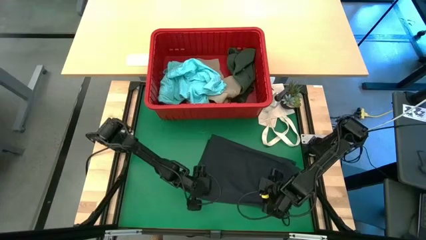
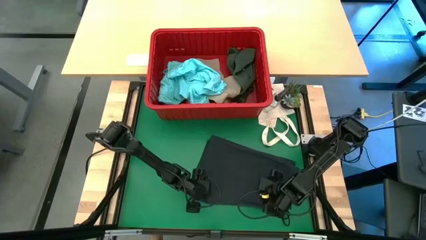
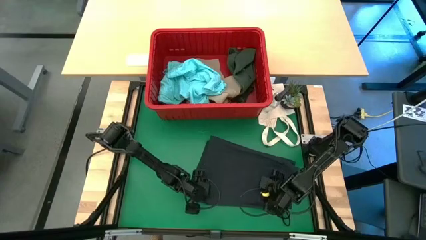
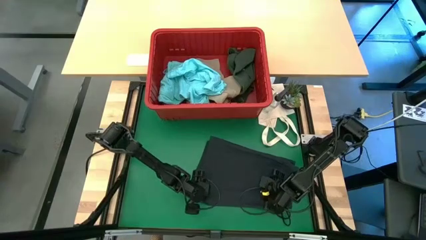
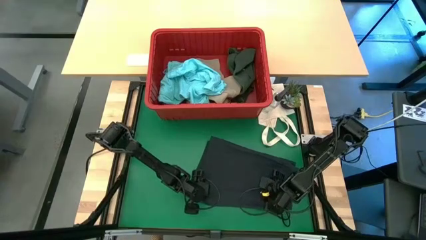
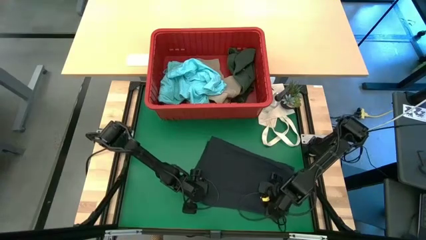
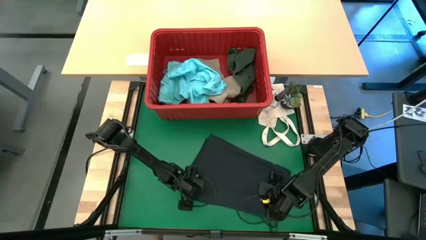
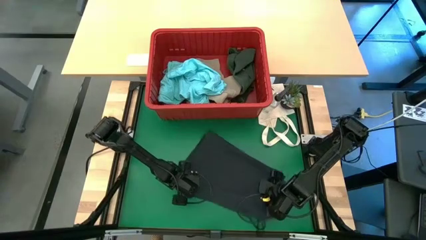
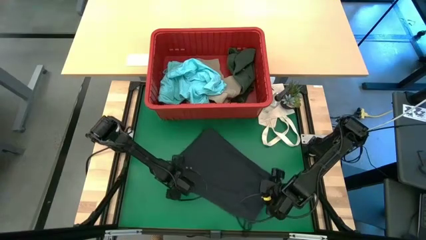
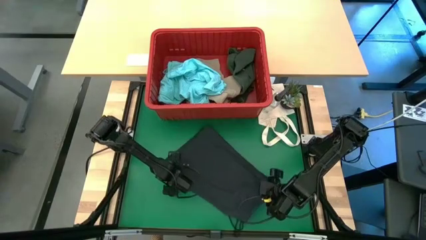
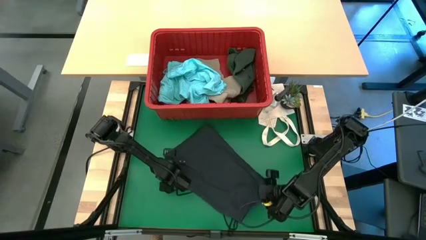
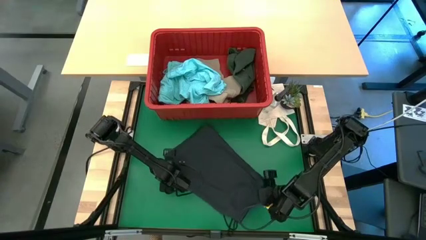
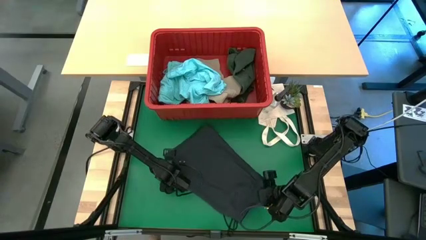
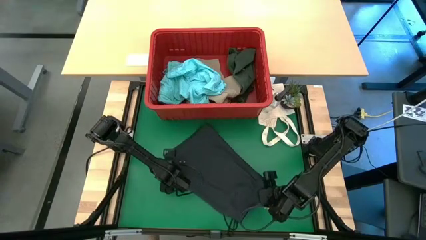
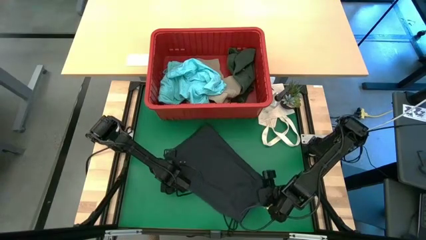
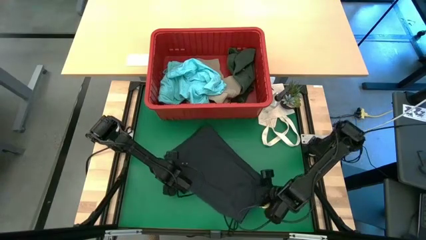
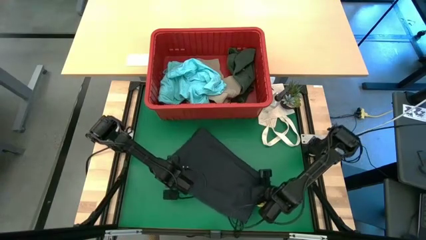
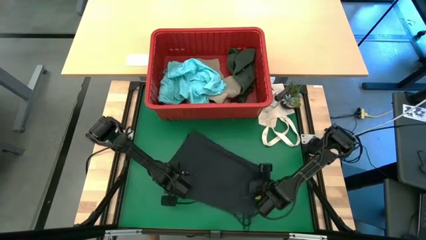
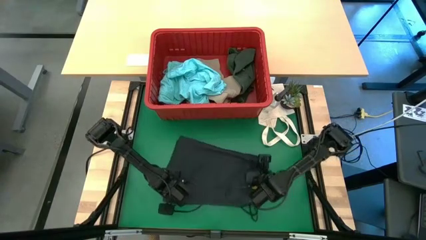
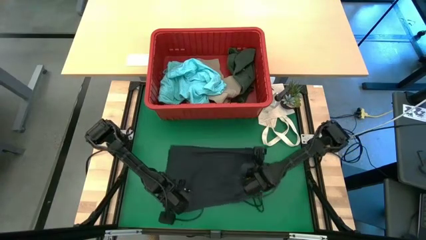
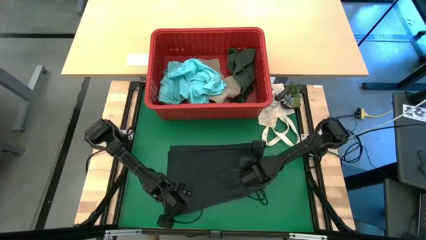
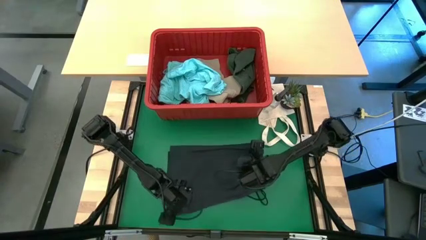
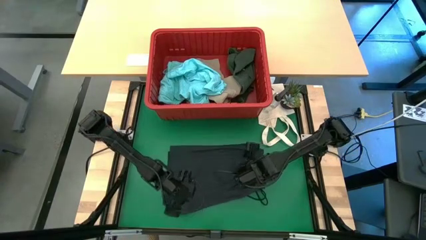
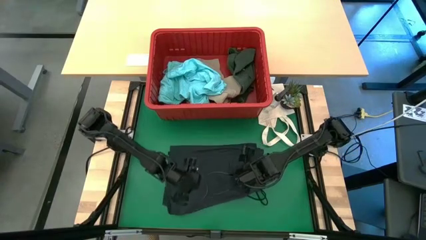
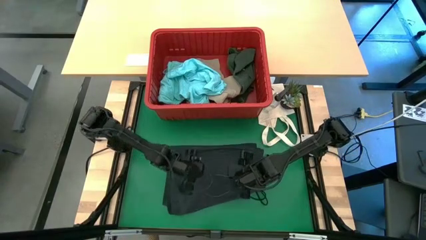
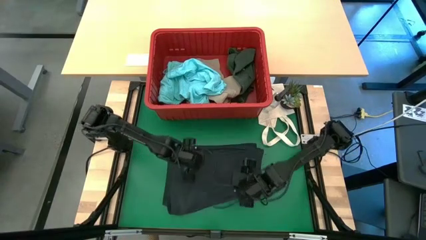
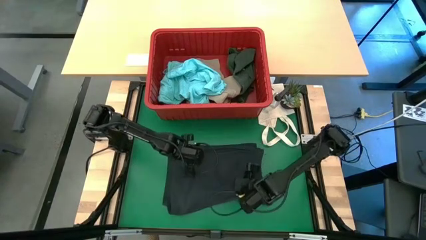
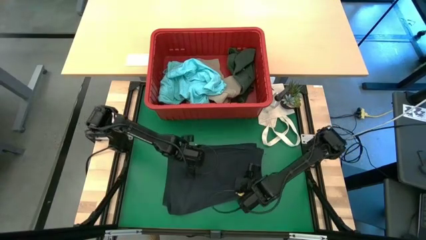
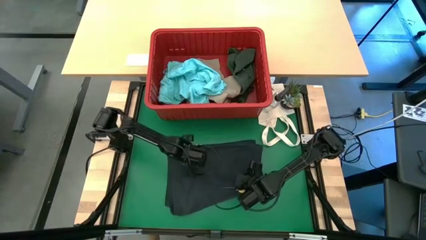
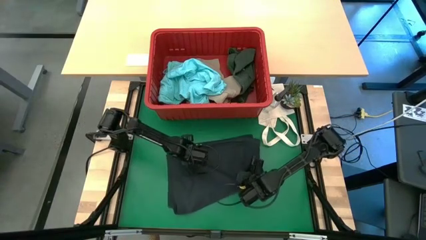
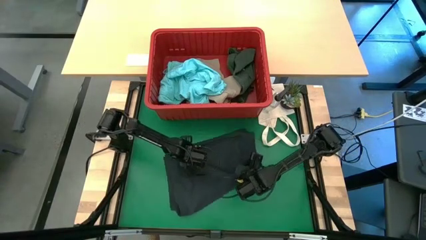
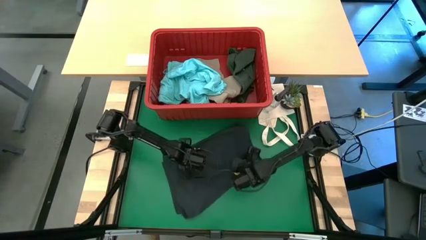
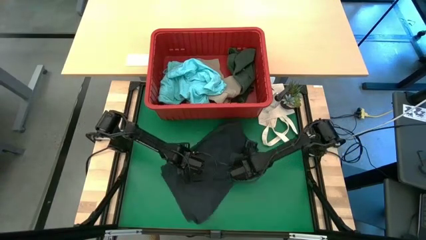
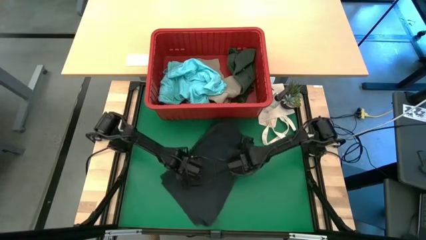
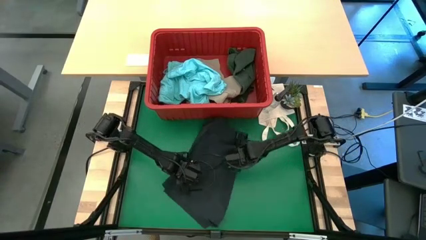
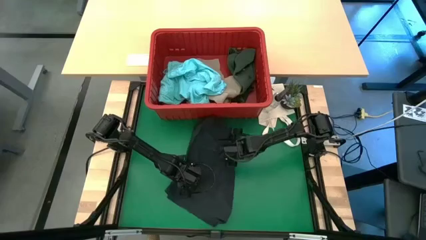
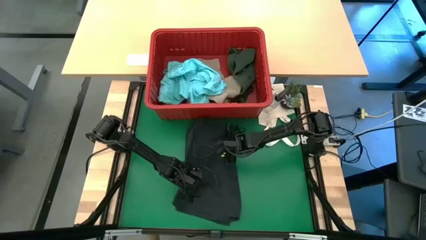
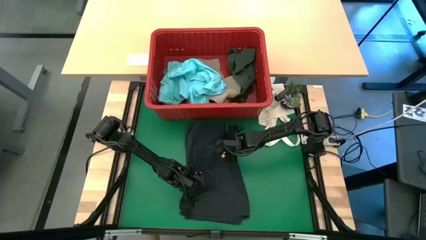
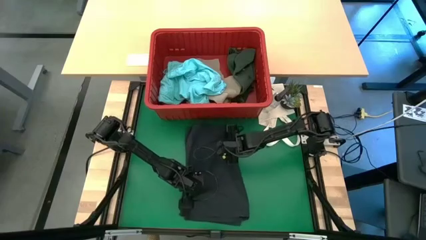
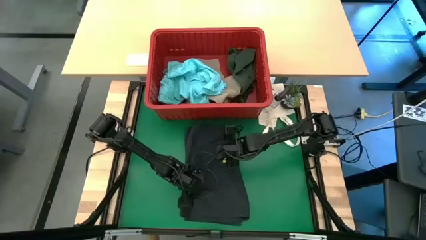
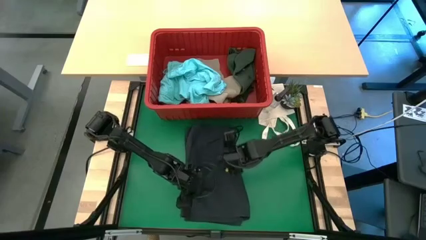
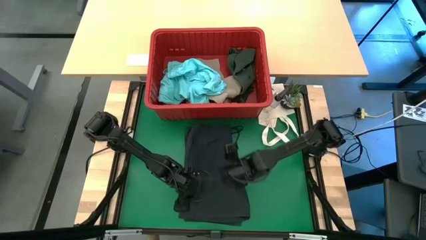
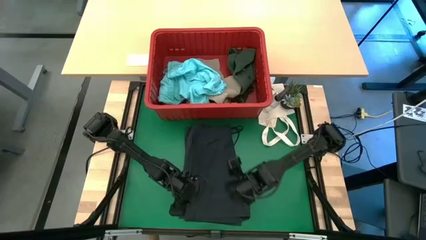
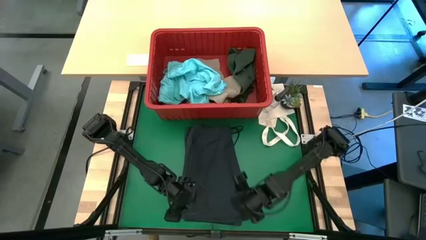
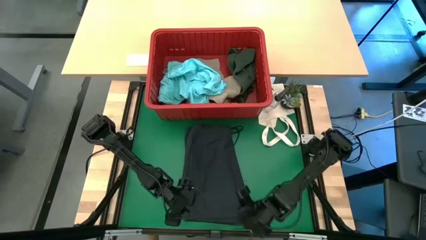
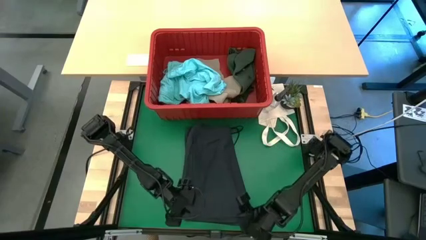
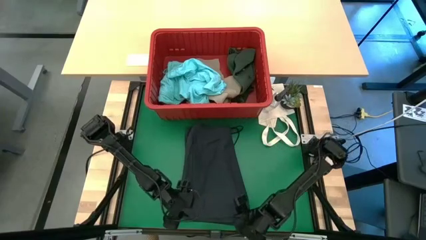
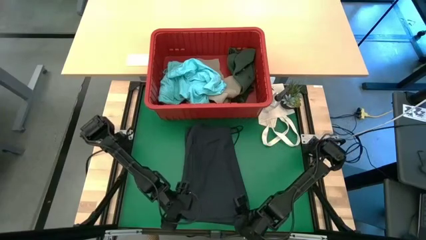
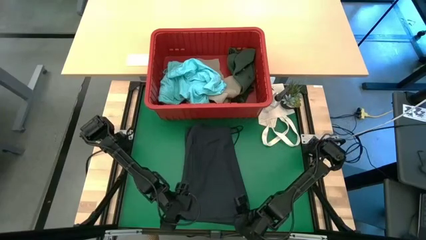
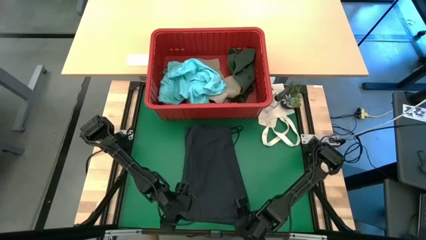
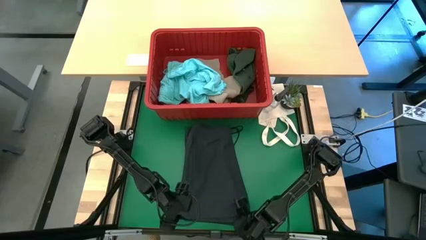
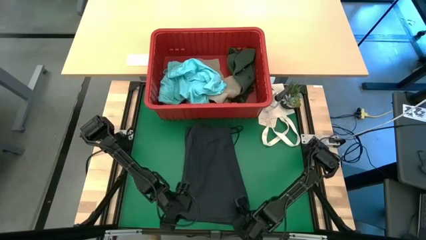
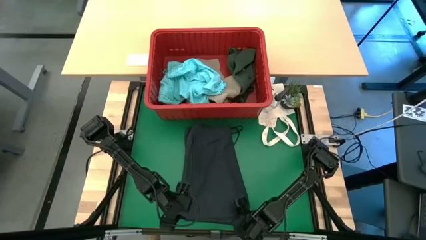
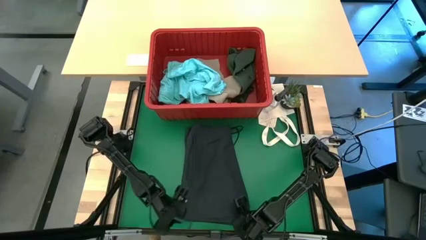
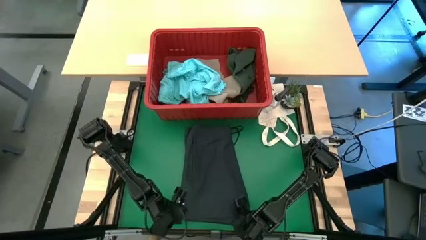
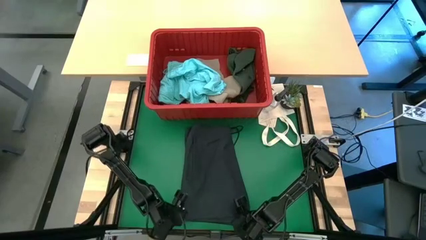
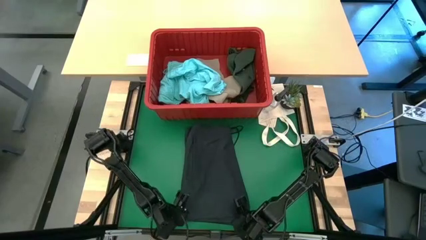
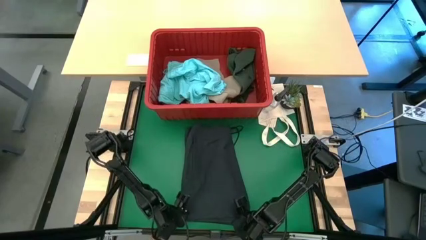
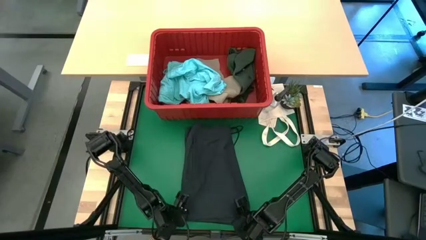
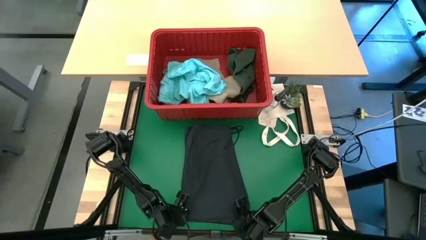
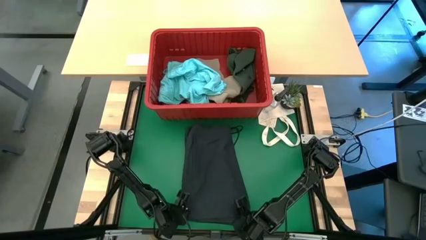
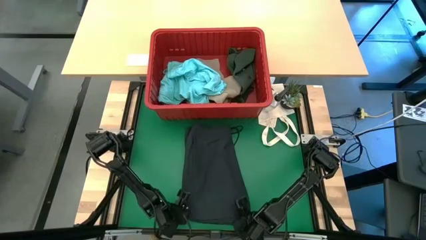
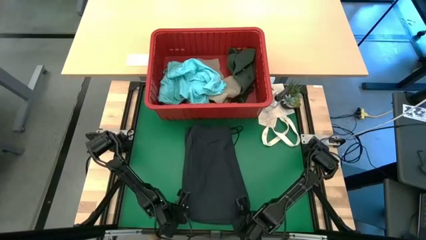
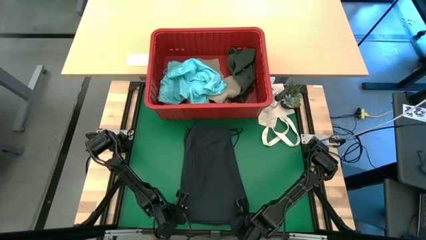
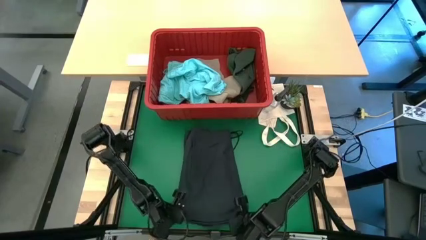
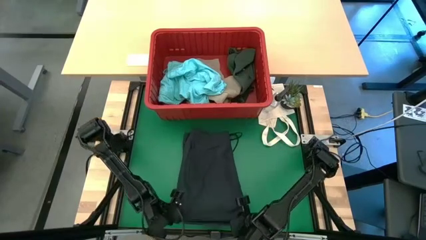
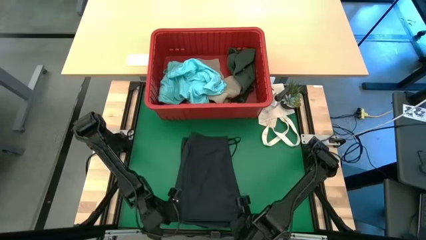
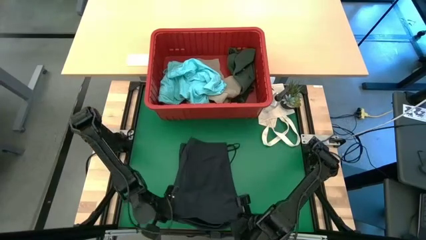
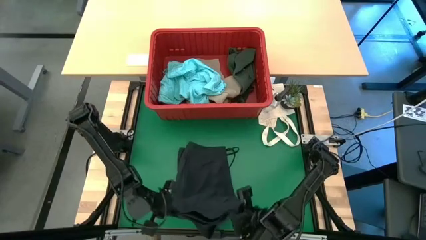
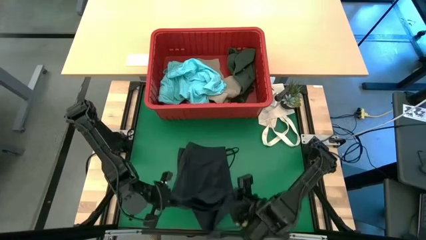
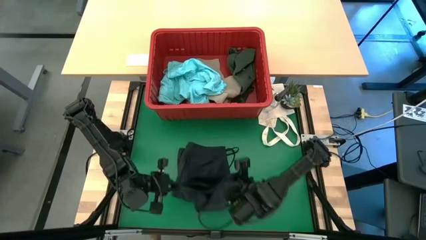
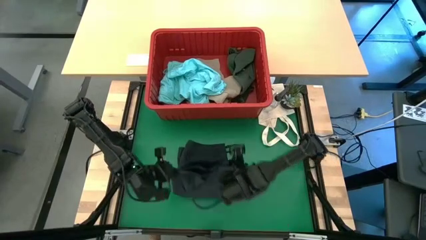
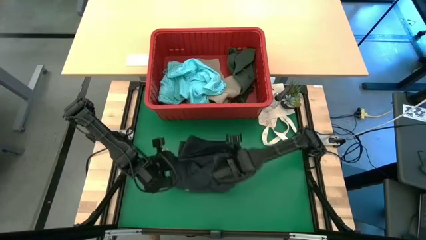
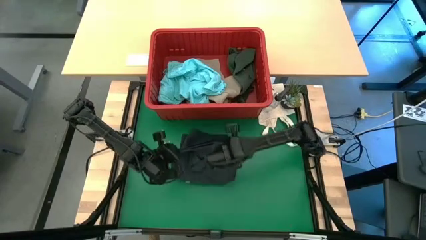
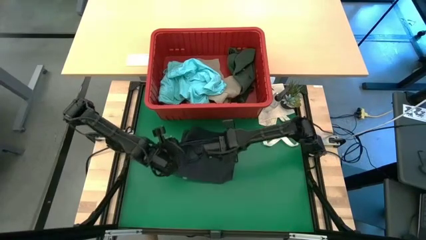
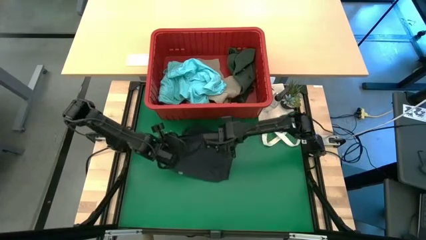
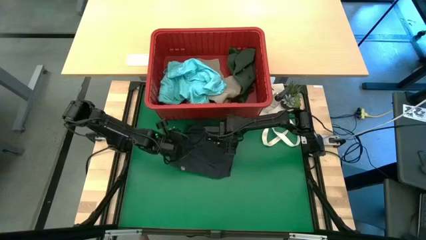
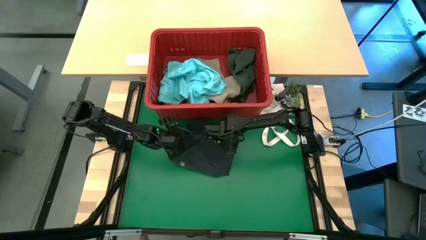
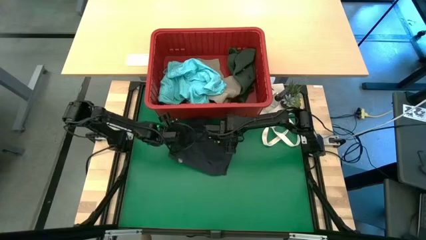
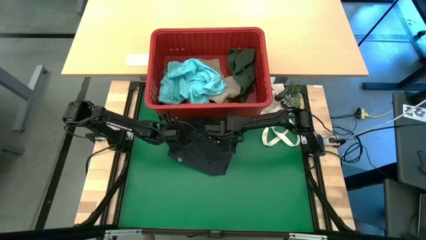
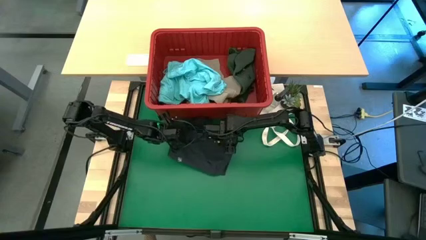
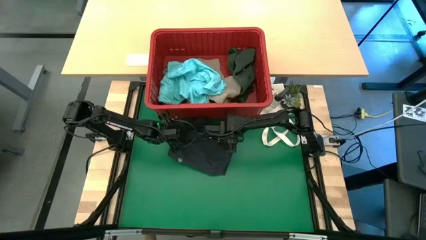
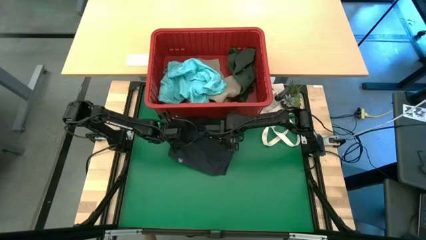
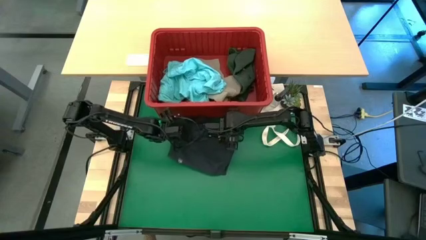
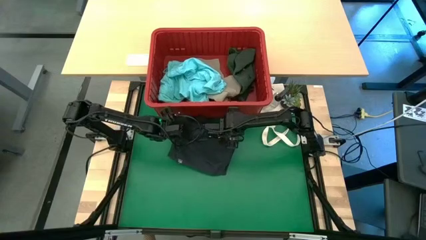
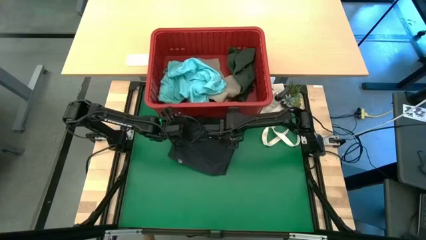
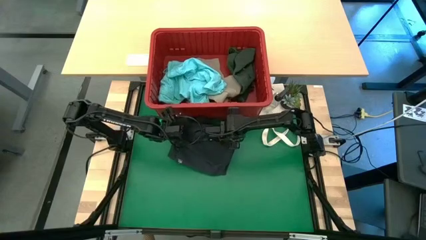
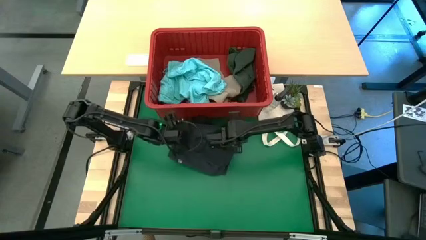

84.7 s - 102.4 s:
Task: Fold Laundry from Bin
Fold the black shorts from the red laundry bin
